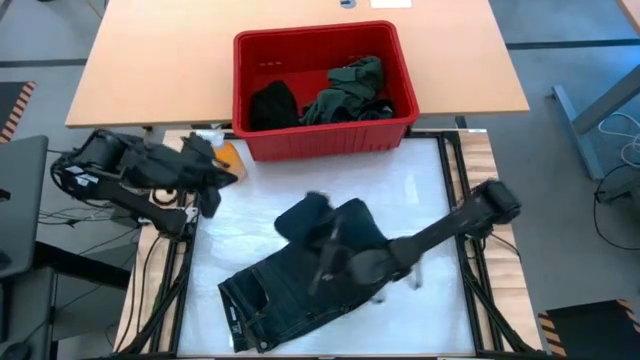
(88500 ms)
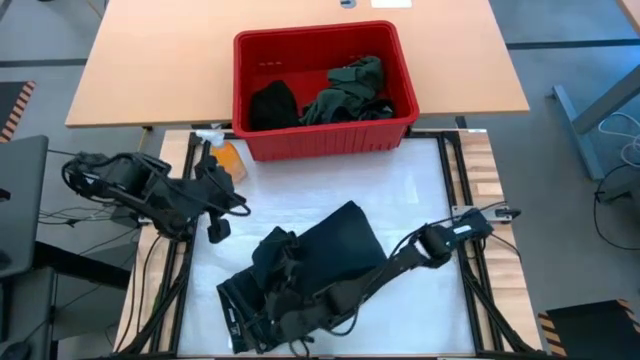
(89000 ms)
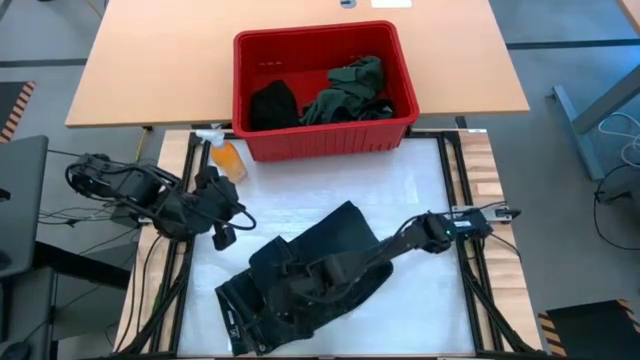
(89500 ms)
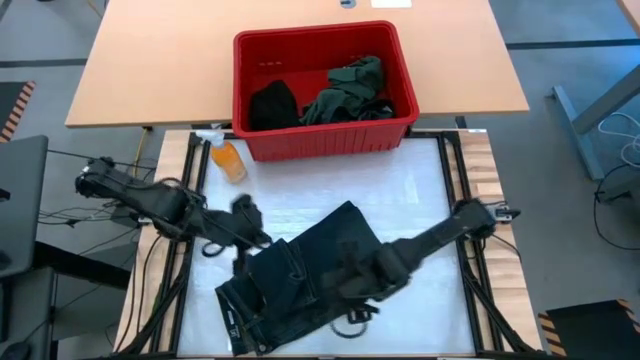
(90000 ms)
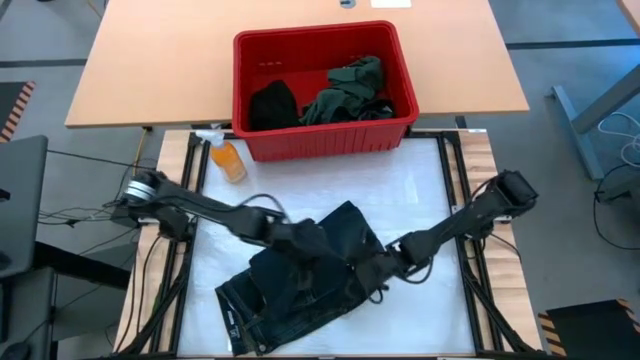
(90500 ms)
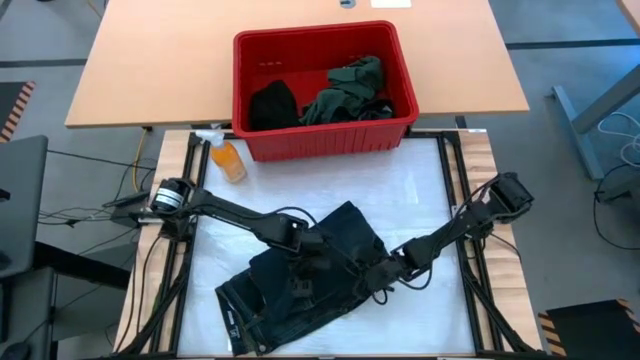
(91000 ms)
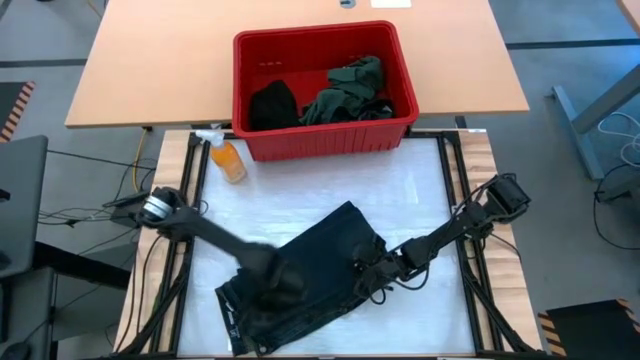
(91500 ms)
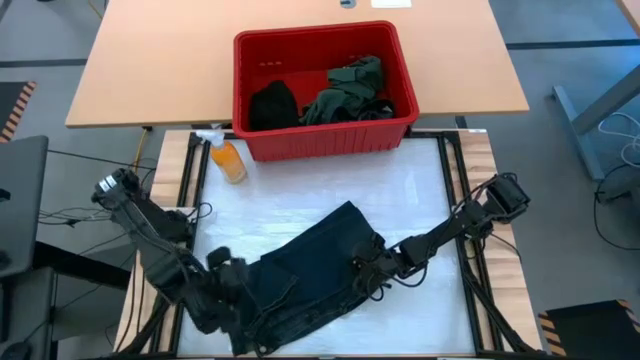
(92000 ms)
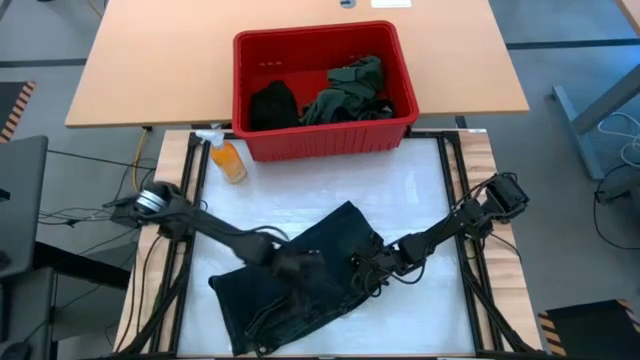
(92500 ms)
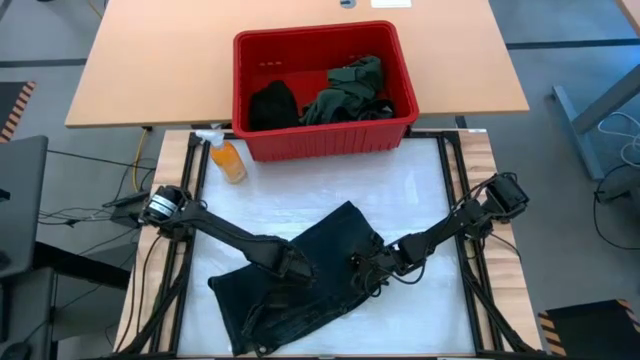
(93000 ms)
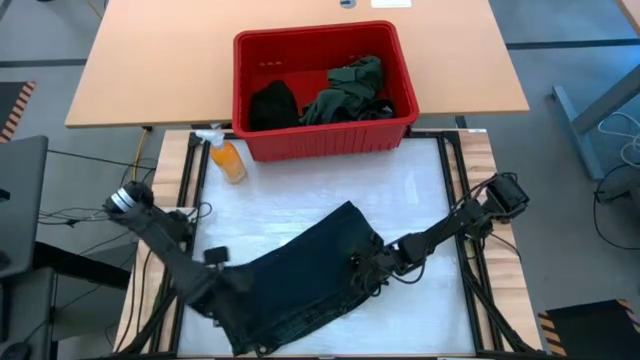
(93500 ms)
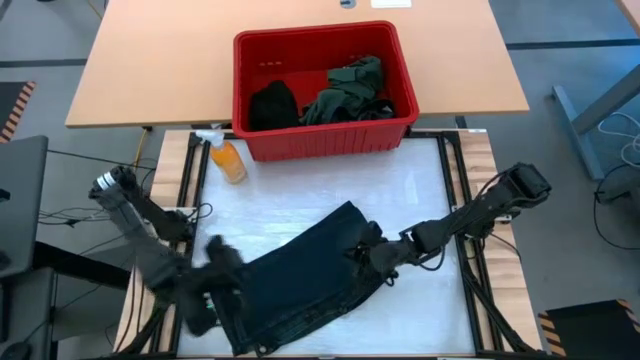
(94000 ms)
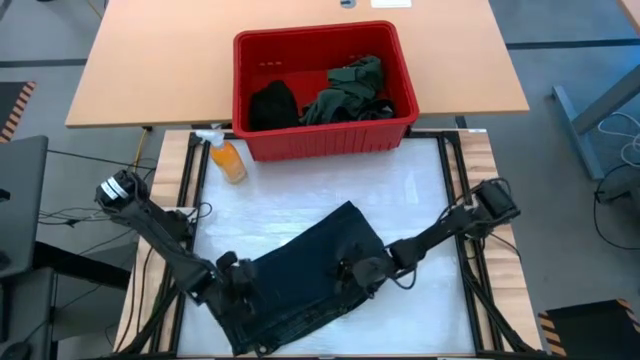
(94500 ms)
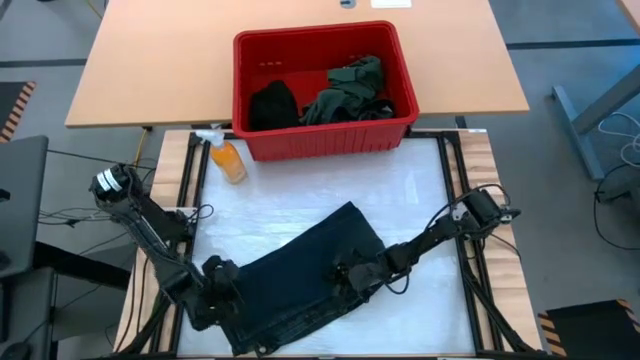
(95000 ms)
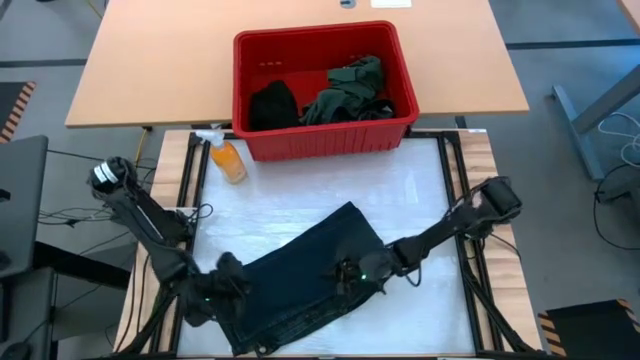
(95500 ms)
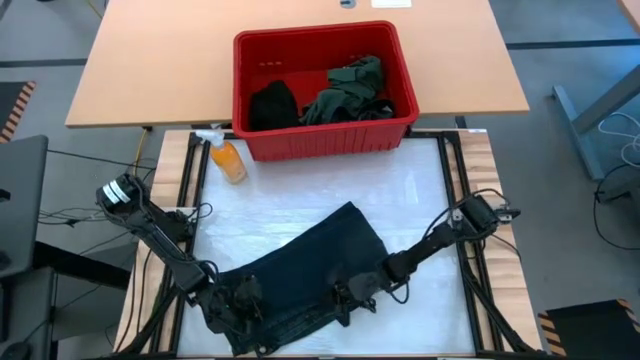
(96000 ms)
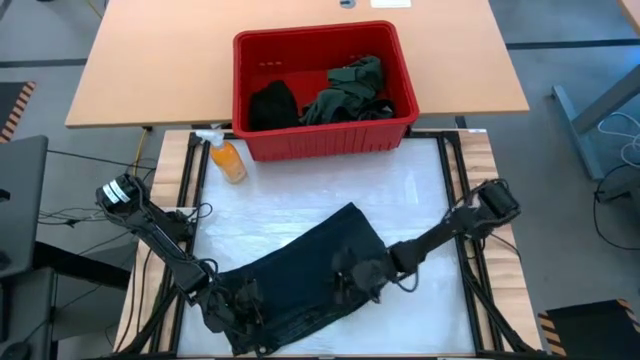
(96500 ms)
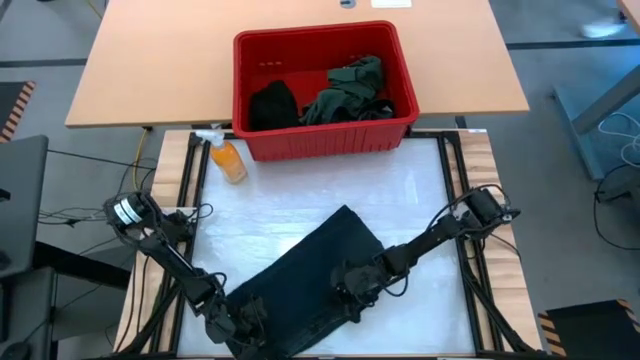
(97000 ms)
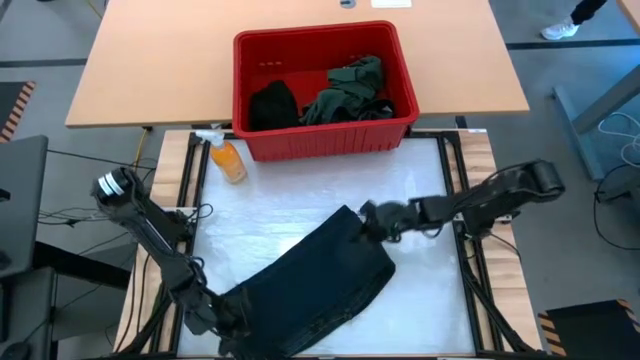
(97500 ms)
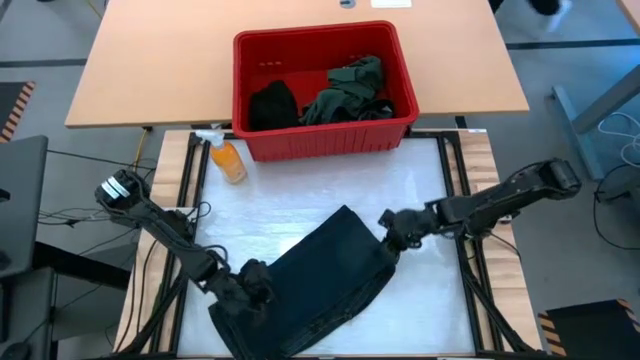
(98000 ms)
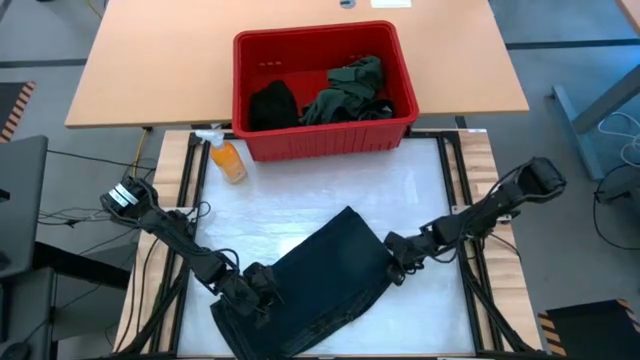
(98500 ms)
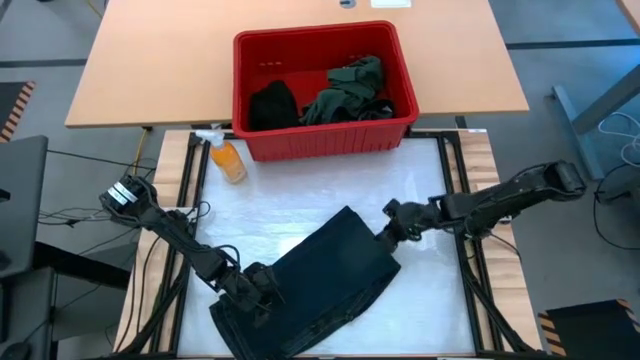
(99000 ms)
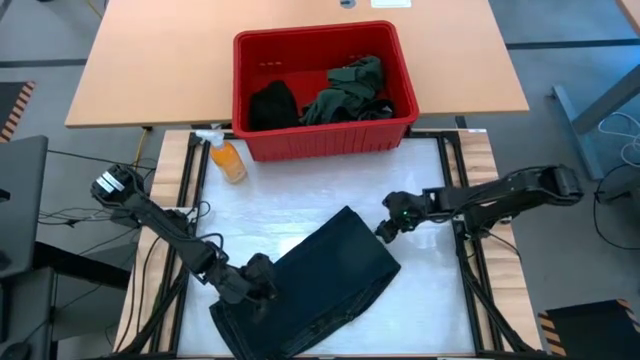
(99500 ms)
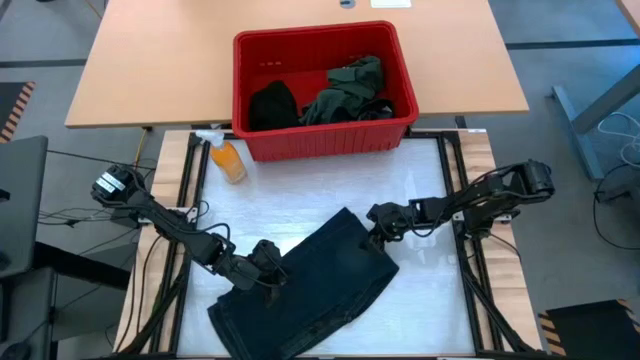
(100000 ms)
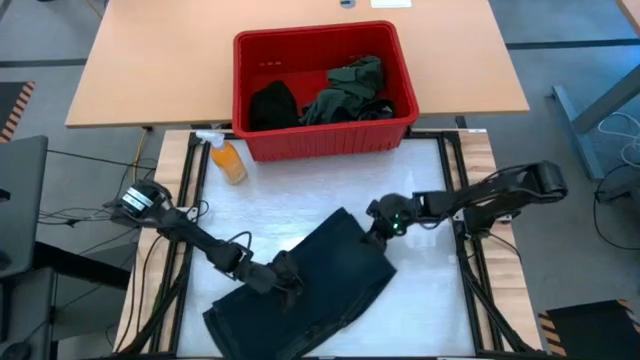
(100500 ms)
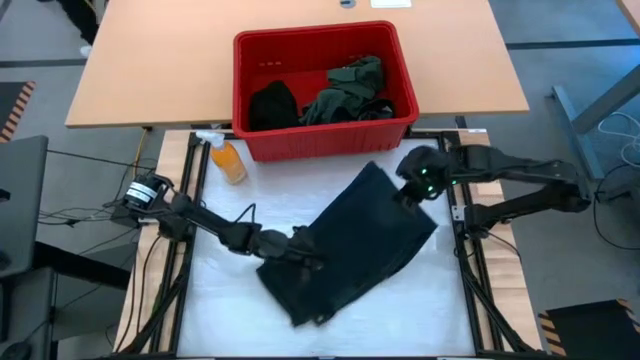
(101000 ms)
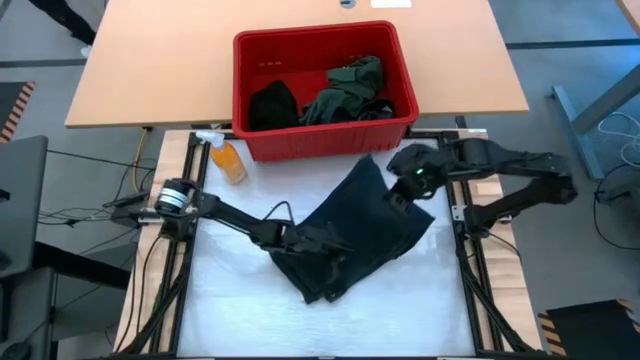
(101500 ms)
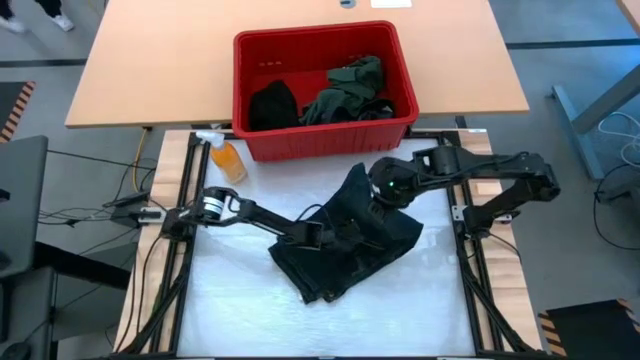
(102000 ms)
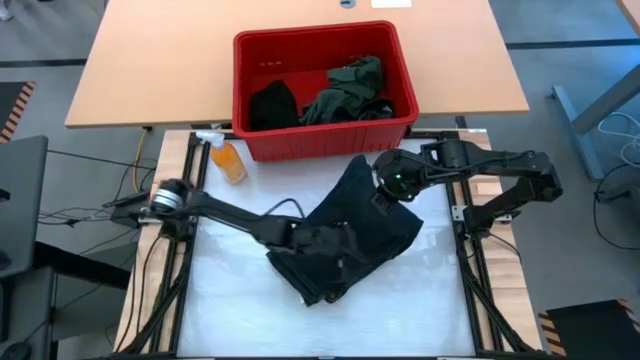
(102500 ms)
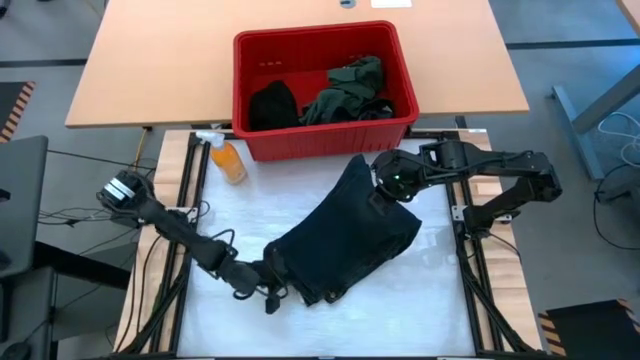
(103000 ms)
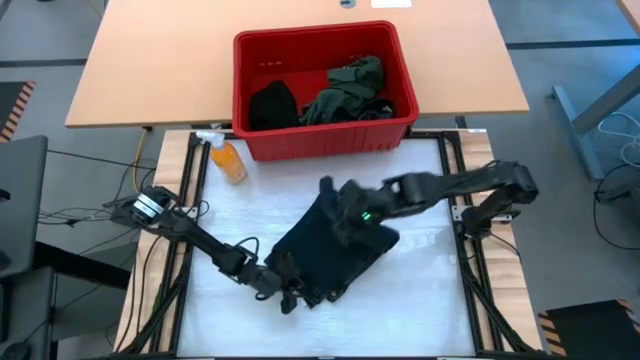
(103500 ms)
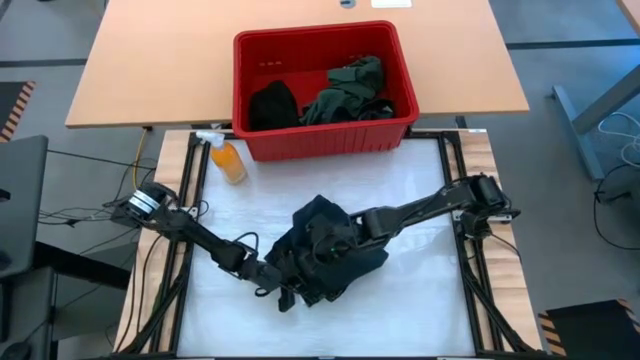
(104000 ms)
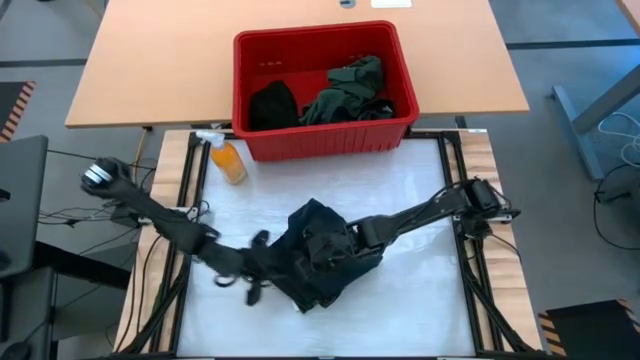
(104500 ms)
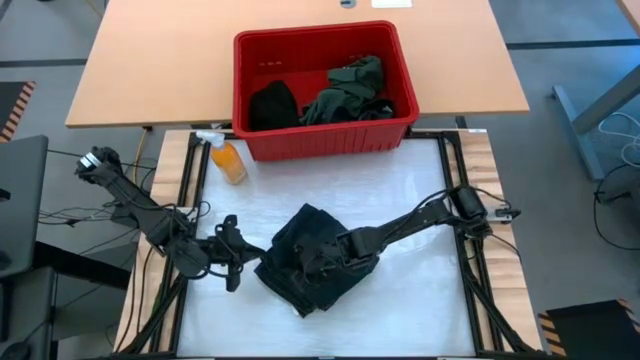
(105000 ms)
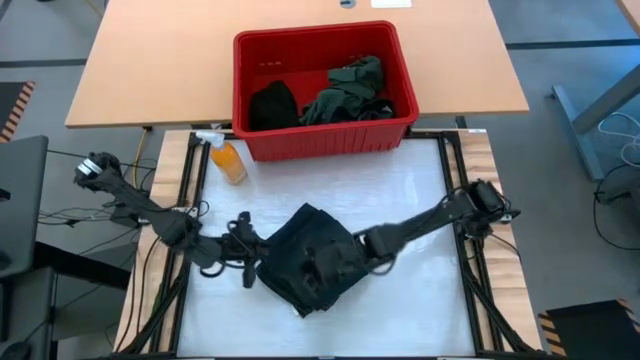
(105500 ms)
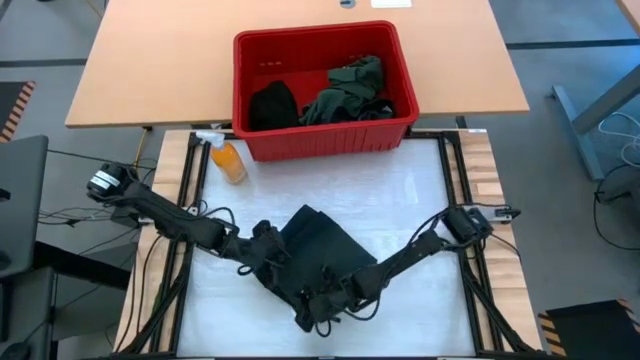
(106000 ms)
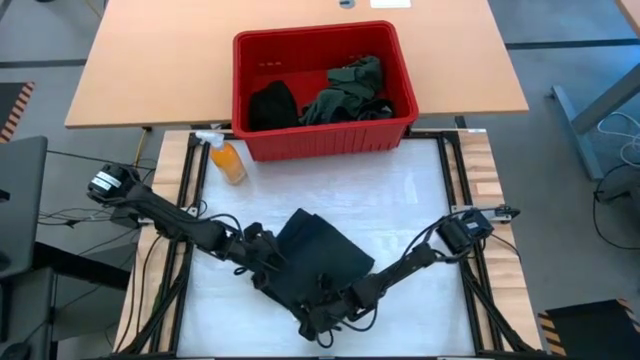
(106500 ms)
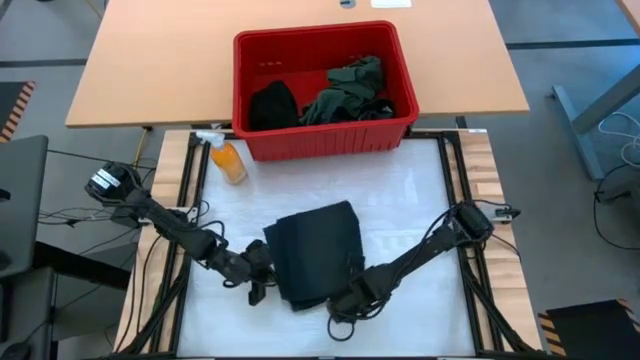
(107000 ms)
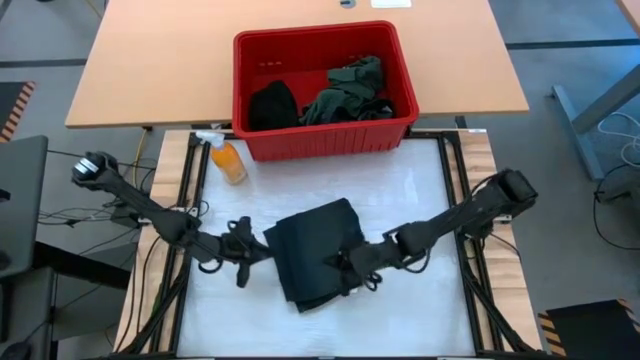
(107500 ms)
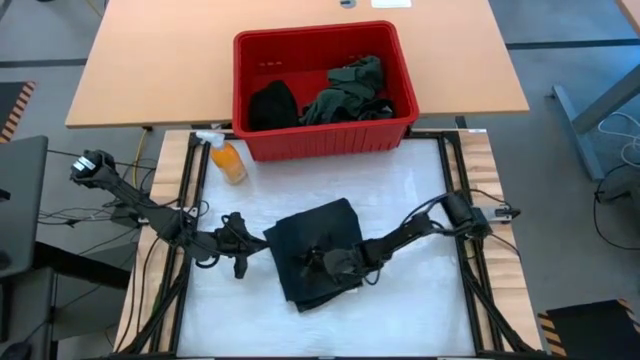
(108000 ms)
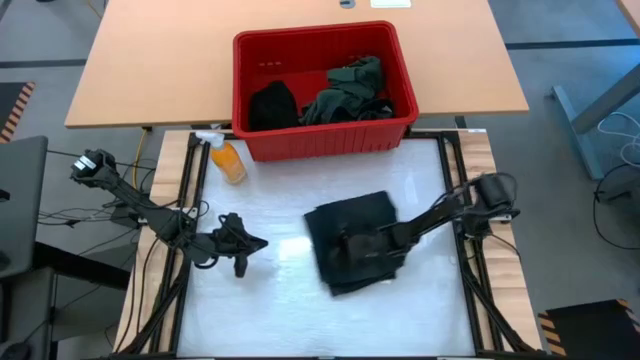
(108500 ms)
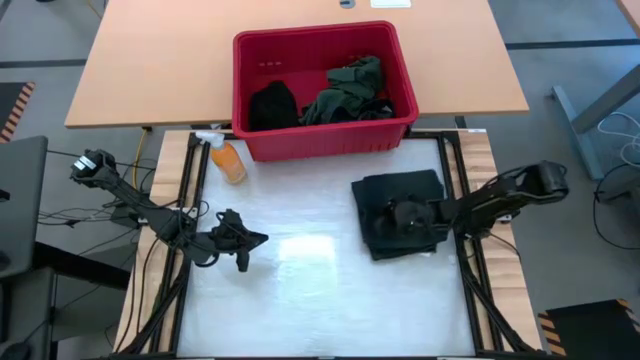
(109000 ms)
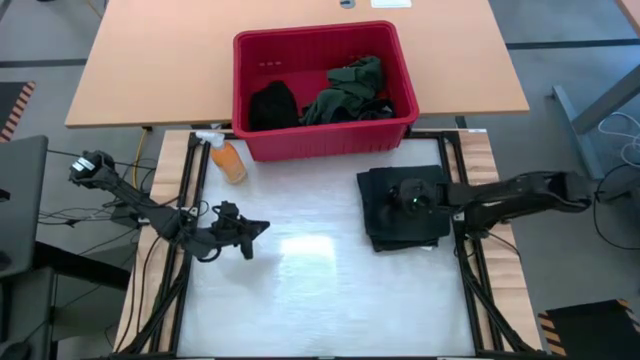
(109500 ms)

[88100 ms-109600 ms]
Task: Fold Laundry from Bin
Fold the dark blue pants

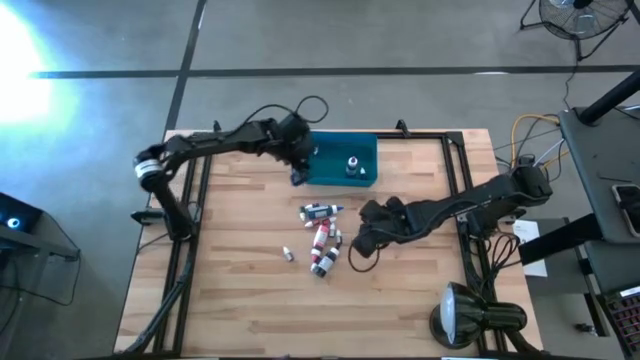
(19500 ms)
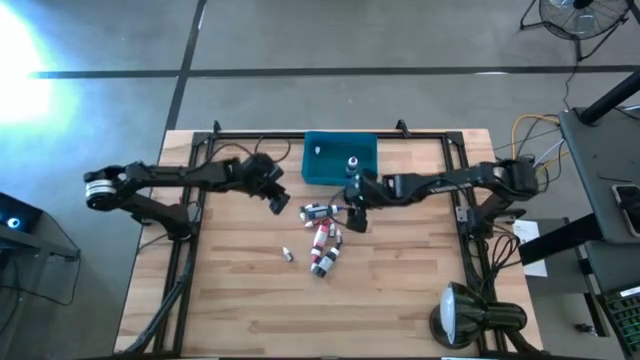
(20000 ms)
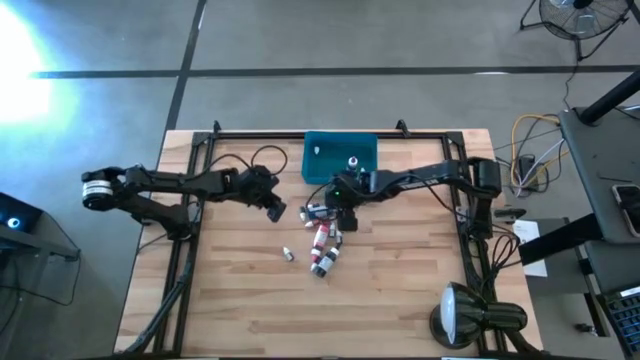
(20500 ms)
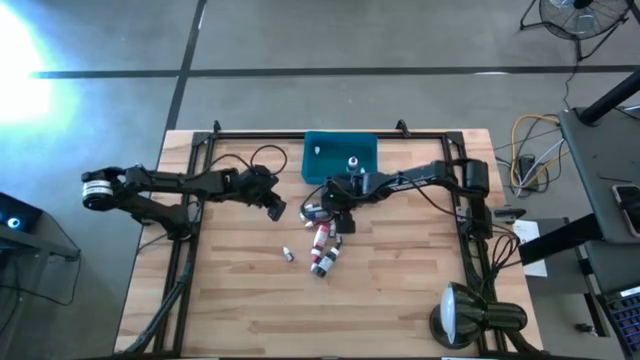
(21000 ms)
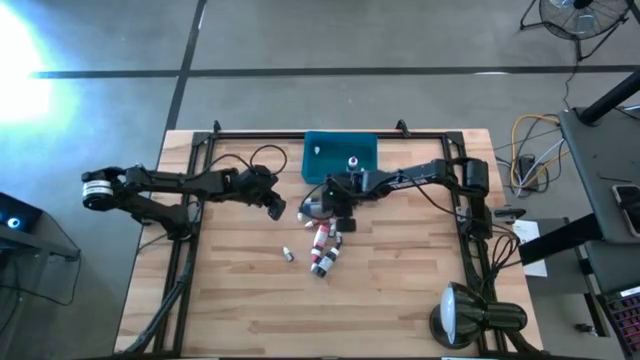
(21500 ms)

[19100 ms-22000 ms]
Task: Pick & Place food coloring
Put the large blue food coloring bottle into the blue bin
